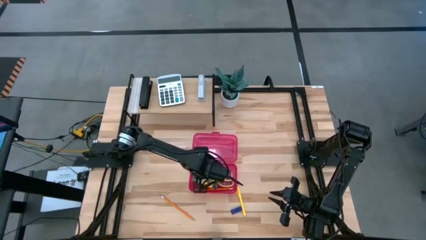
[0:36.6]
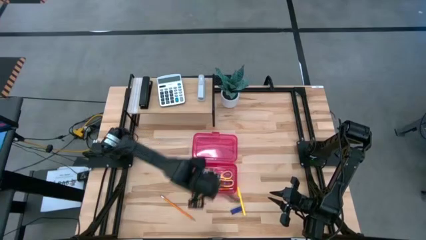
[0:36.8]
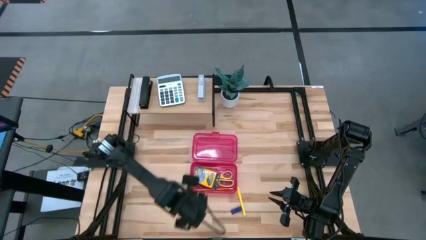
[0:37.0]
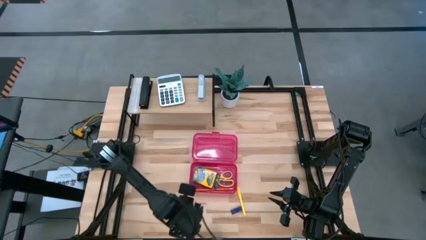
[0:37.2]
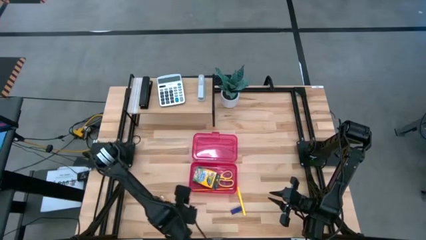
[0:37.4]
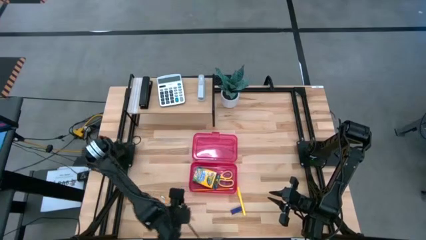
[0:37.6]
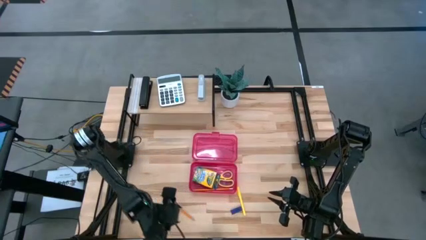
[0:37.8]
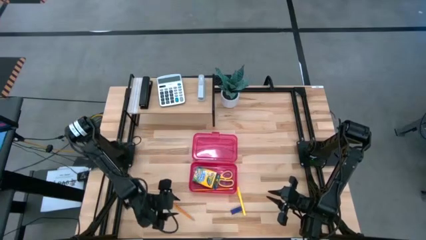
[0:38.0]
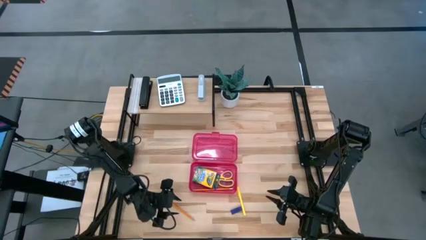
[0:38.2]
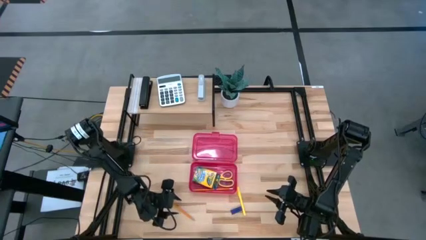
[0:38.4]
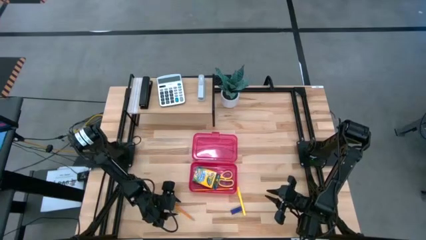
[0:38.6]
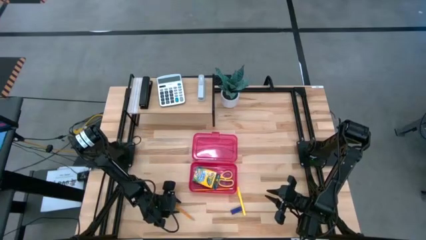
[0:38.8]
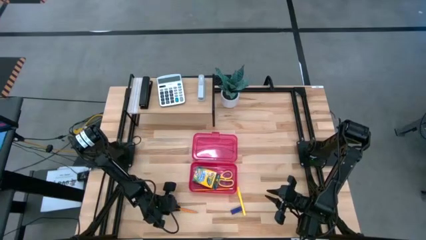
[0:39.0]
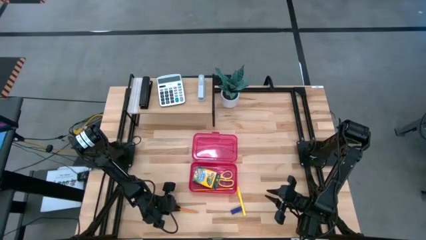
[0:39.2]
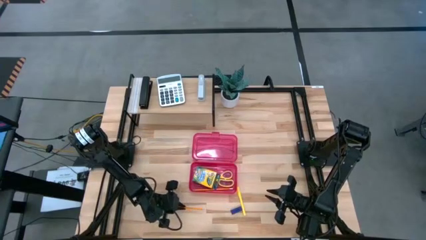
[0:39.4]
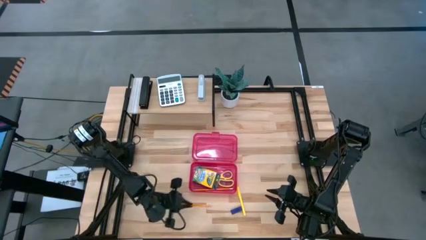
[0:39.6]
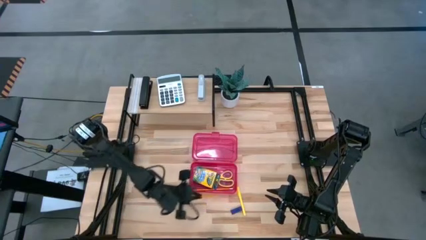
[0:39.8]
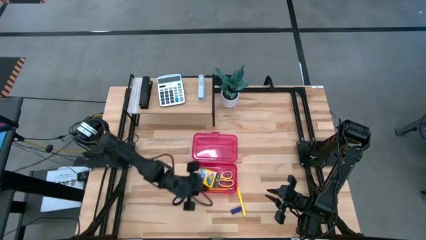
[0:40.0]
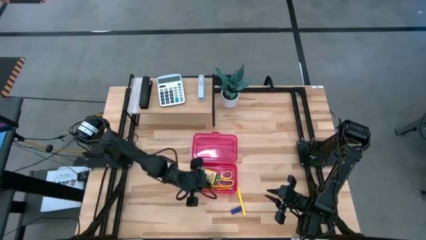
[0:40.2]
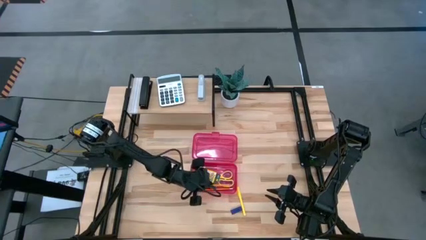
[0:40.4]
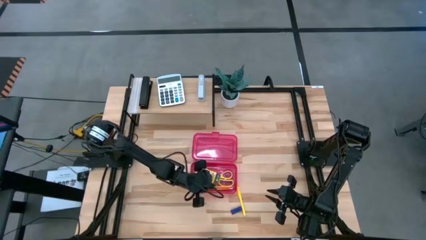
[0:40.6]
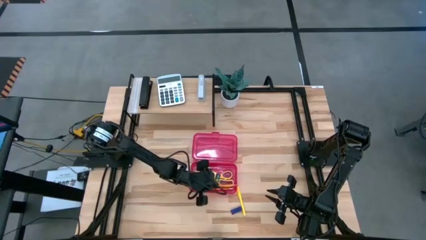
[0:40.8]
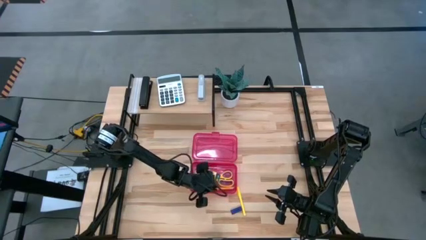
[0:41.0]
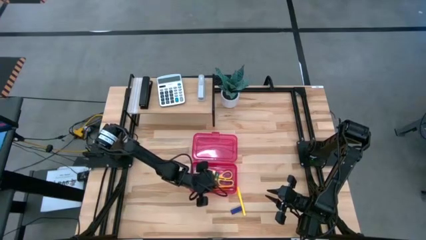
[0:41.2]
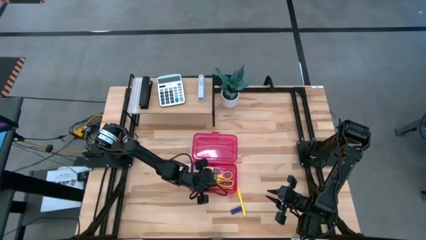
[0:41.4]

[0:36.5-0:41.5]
Task: Pack school essentials
Put the orange pencil into the red supply box

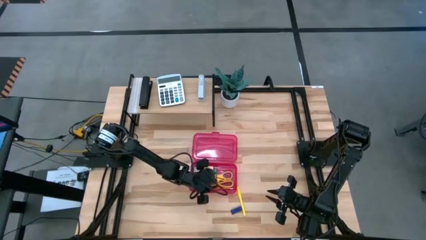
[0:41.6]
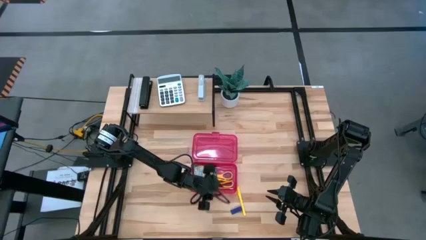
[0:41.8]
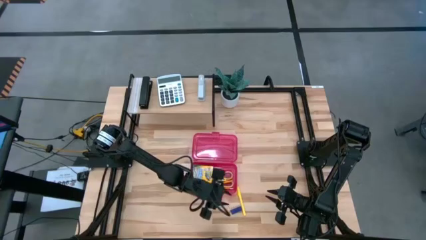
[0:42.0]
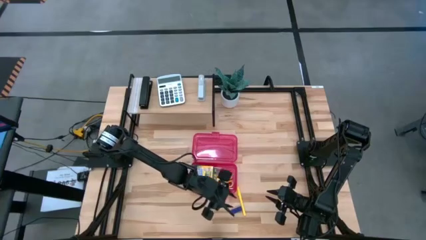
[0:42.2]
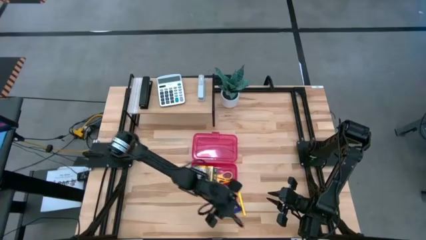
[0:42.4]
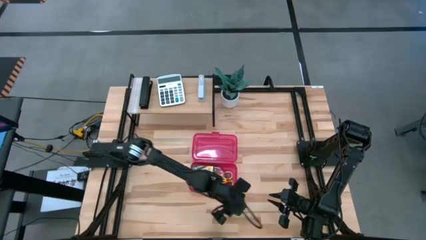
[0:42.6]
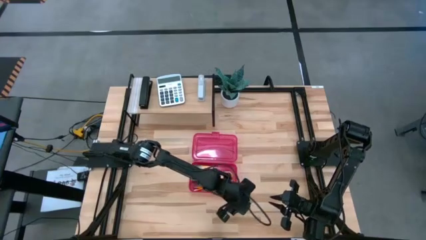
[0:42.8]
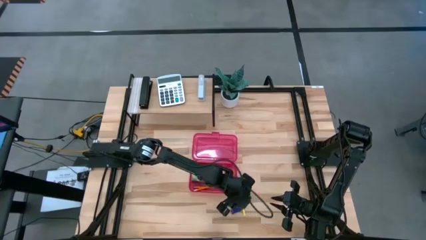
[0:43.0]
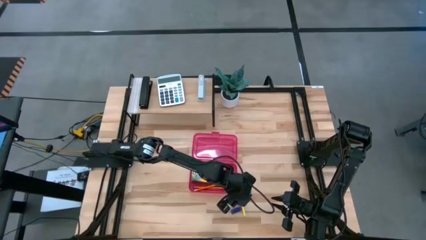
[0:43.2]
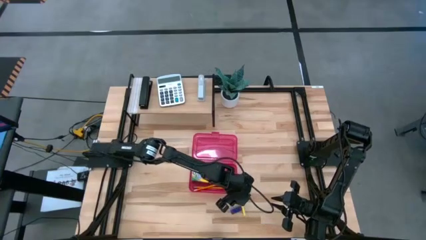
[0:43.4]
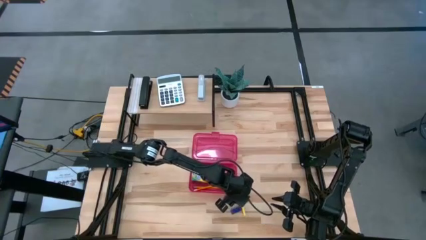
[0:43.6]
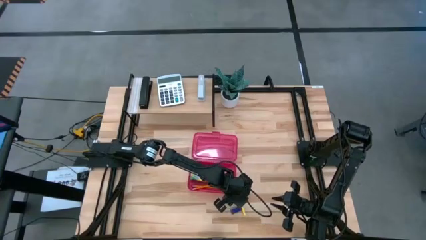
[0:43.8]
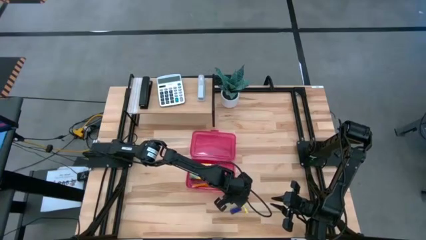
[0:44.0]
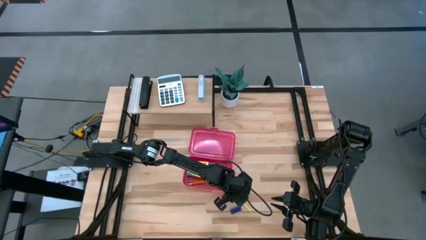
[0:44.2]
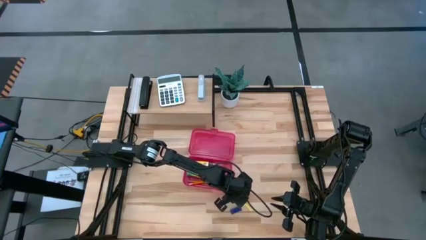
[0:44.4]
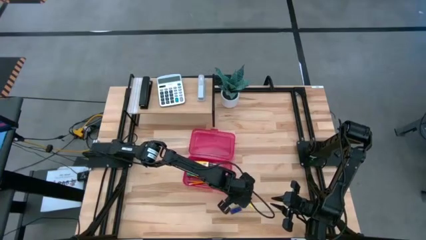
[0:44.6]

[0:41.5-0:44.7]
Put the yellow pen into the red supply box

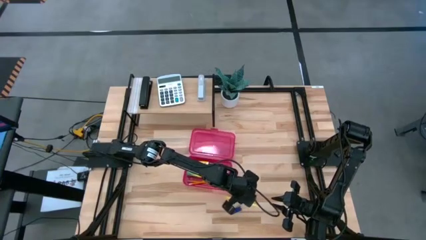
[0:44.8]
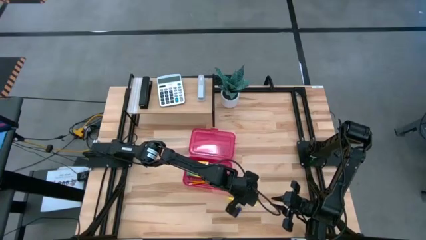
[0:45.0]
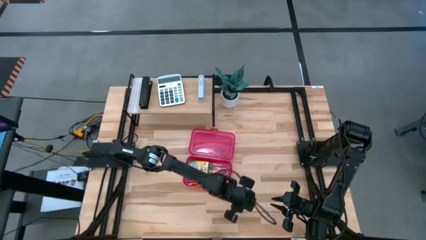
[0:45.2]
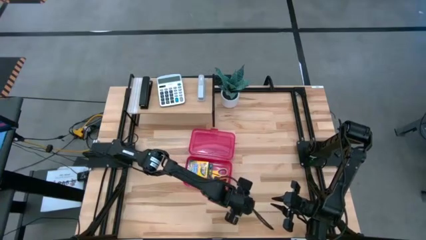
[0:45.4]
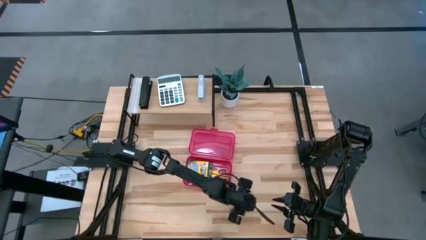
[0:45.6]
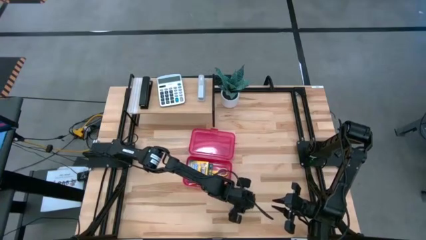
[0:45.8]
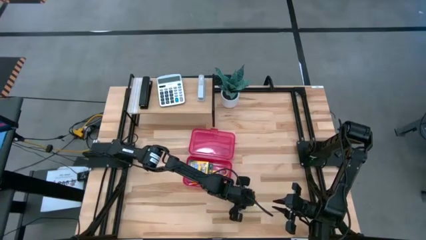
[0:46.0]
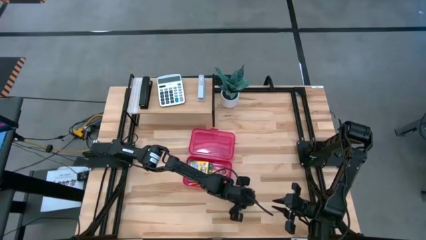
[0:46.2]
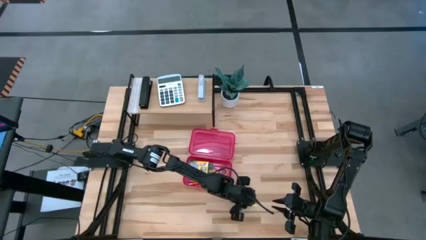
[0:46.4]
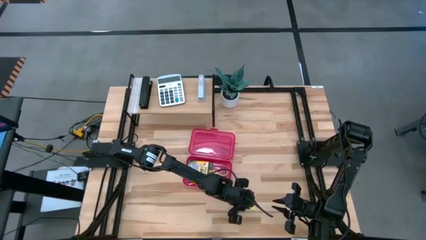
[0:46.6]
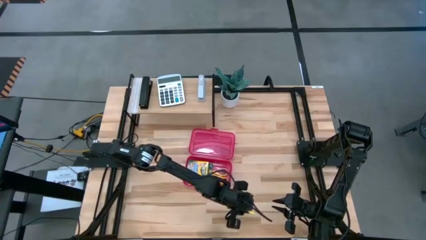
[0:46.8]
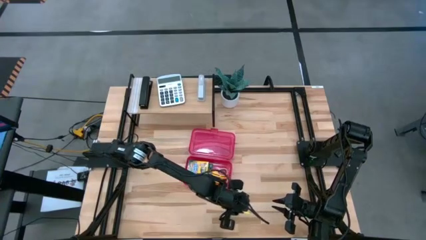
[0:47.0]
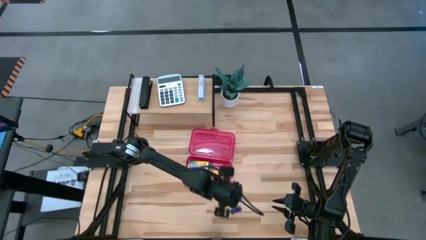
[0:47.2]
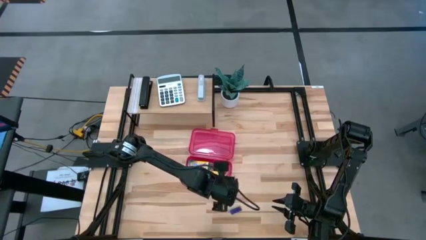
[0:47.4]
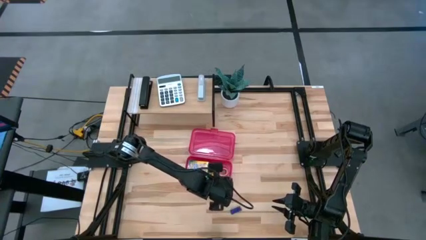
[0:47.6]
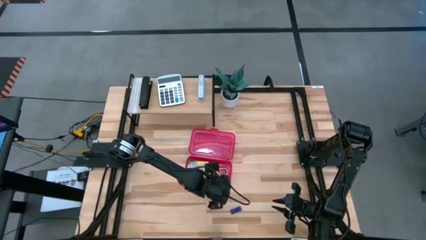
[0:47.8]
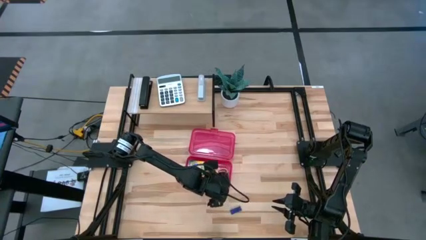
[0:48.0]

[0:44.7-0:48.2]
Put the yellow pen into the red supply box
